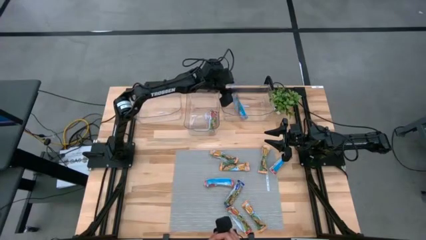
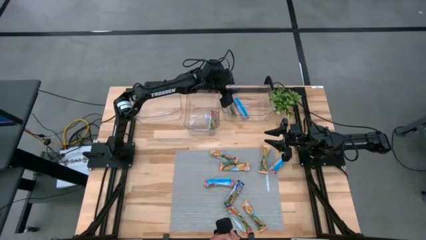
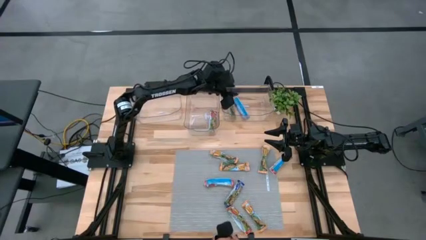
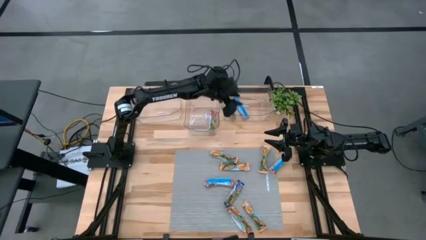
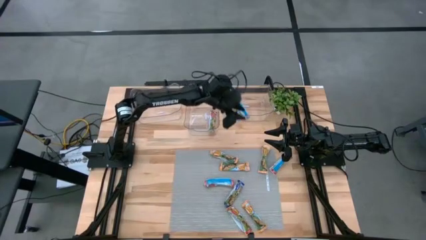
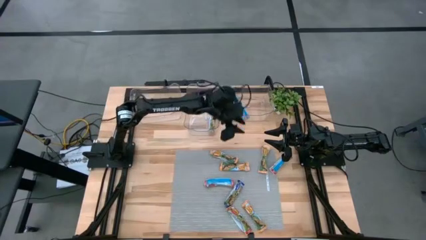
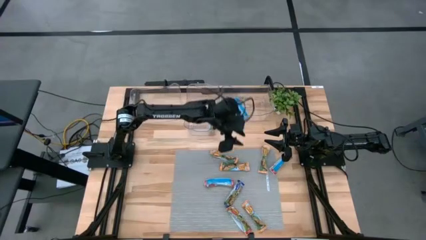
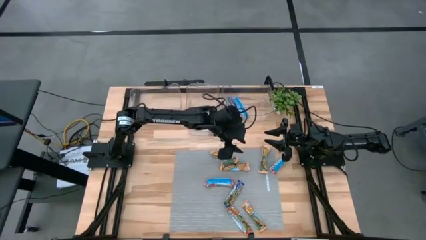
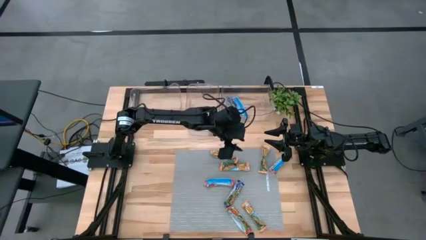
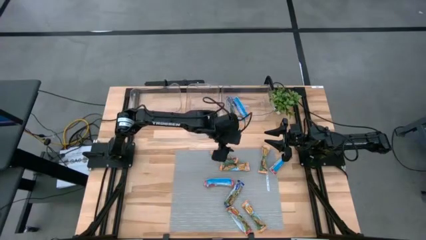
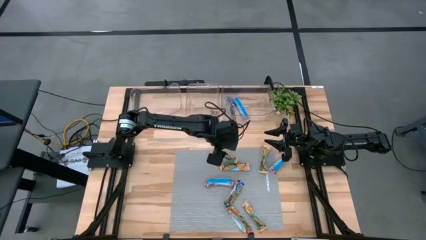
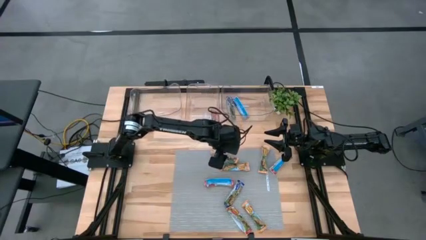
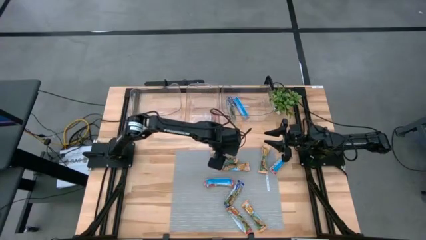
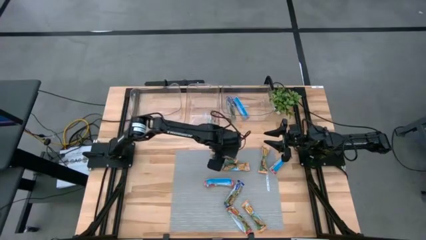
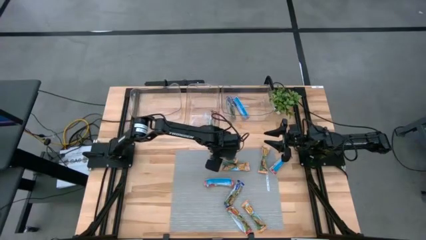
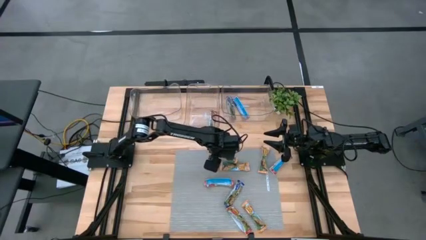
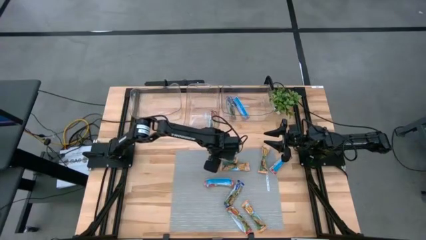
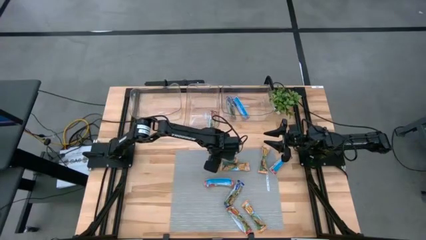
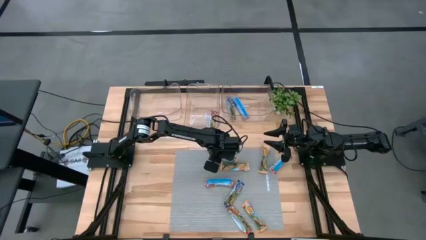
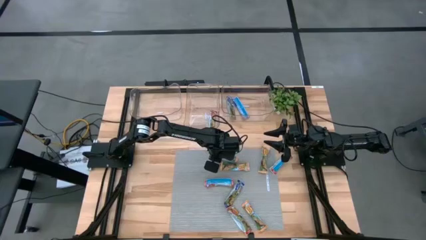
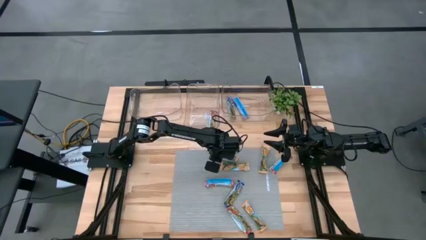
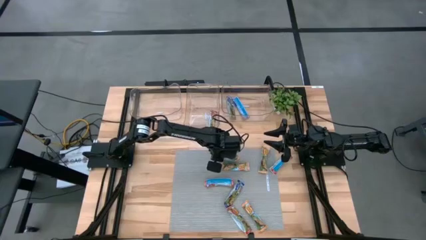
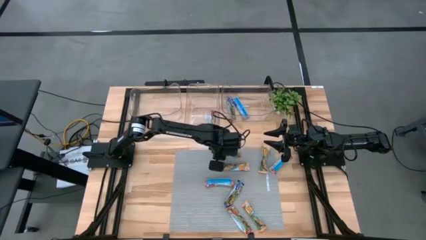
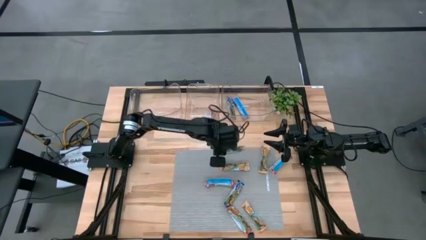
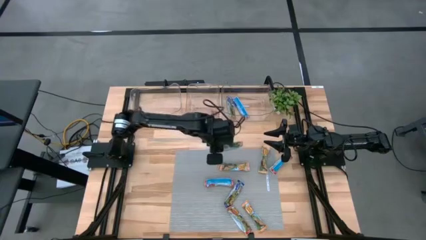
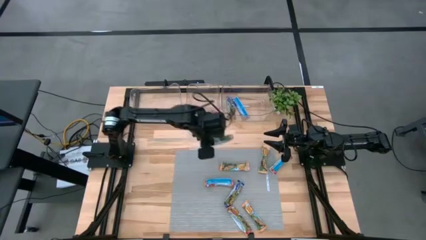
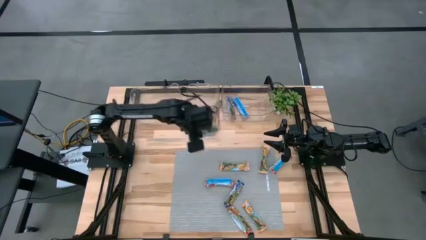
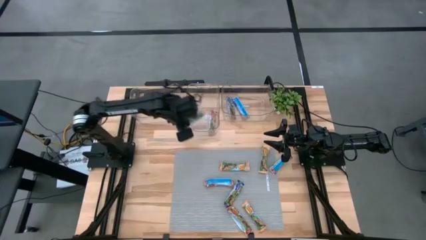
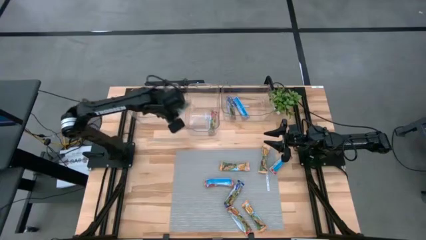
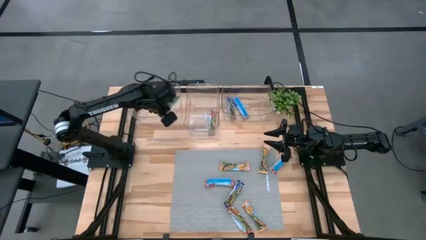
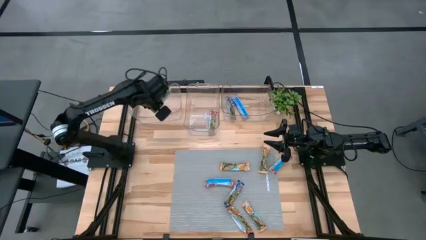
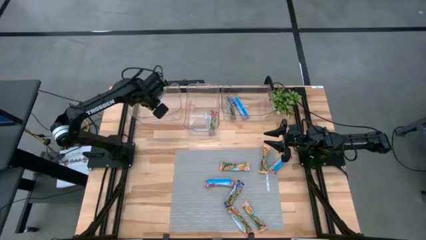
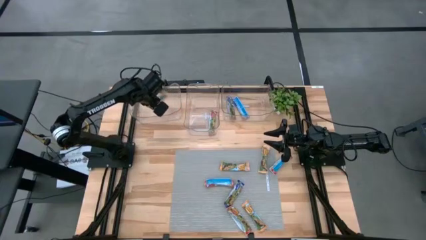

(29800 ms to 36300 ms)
Task: Pick and place Granola Bars by type
Put the yellow granola bar into the left transparent bin

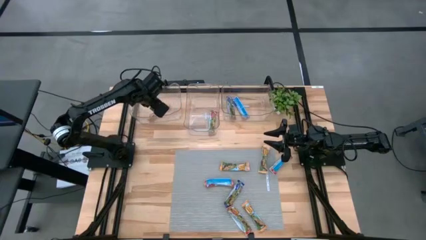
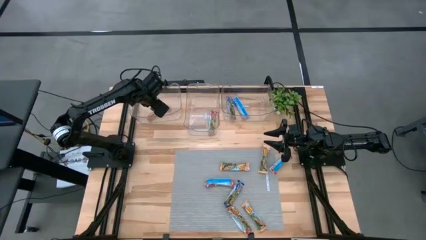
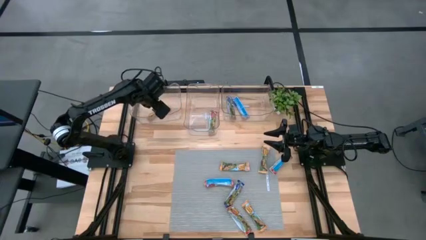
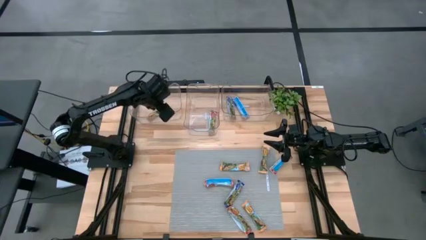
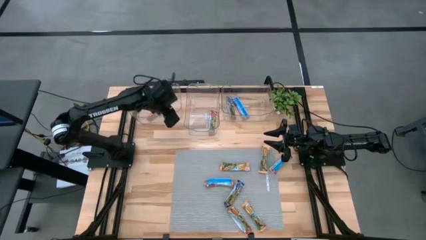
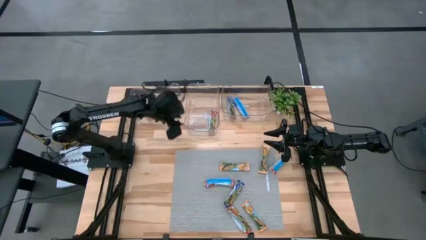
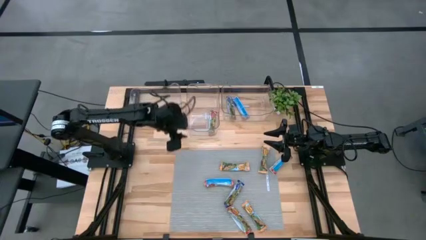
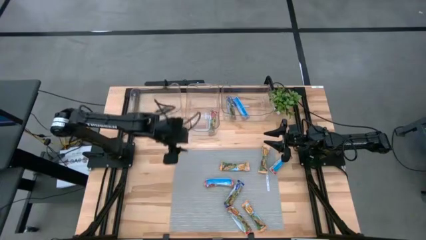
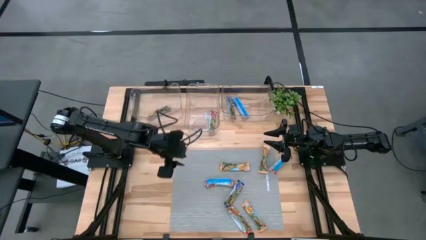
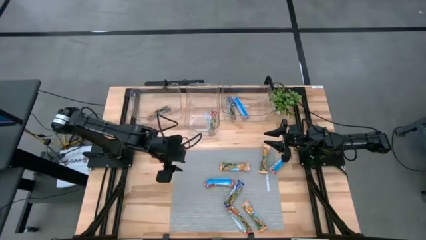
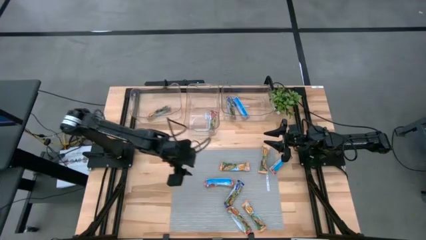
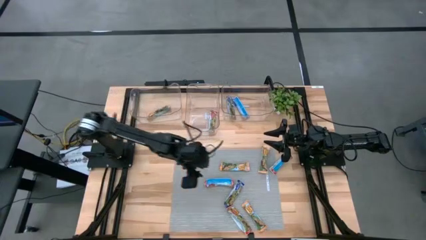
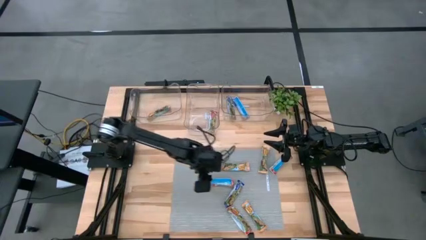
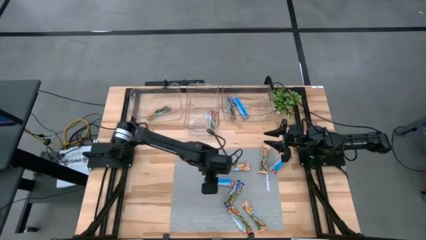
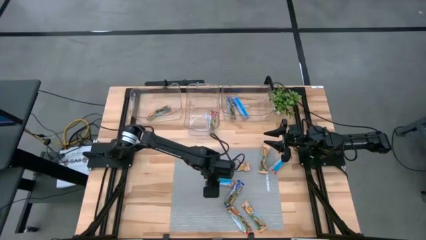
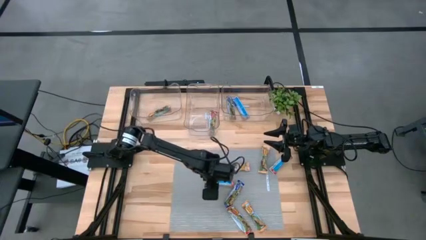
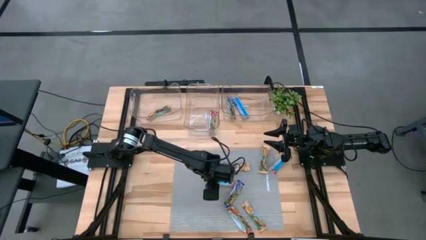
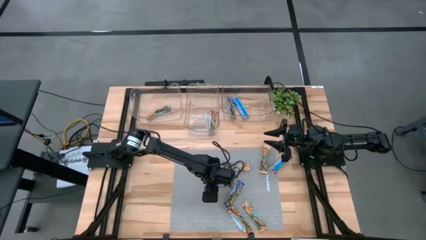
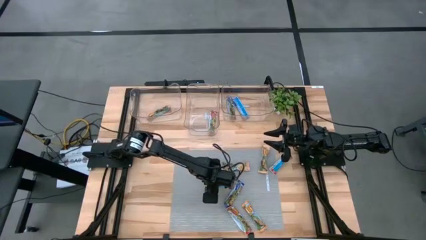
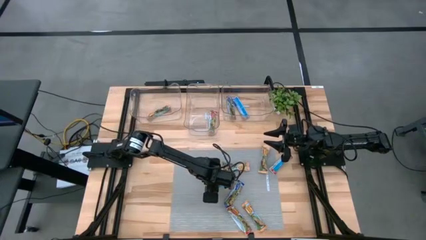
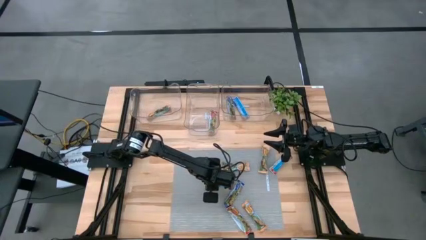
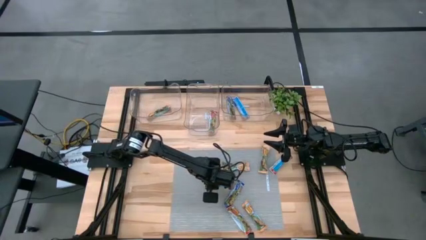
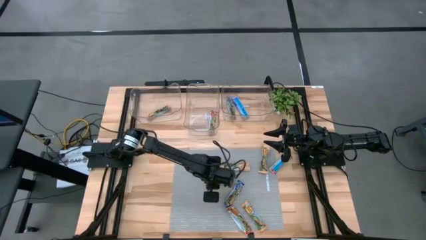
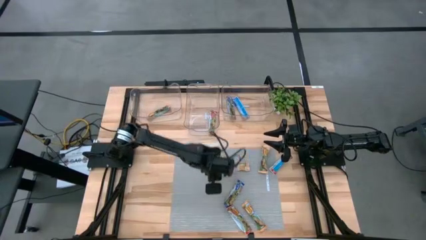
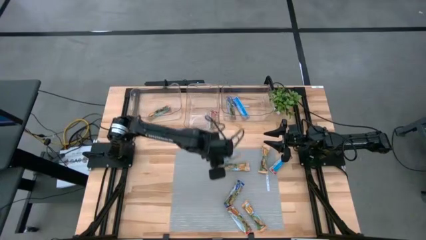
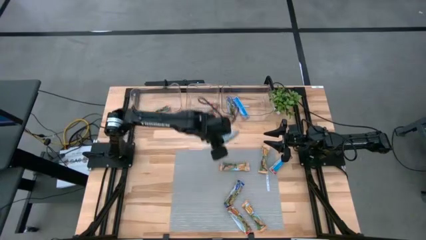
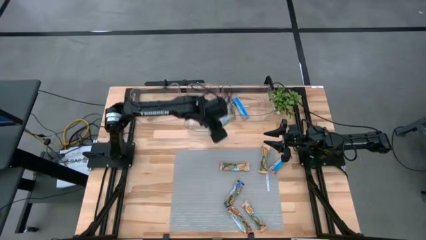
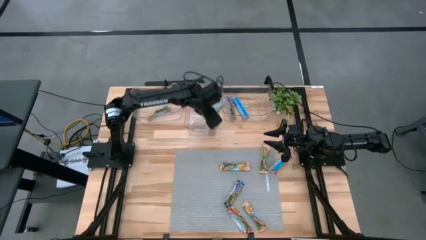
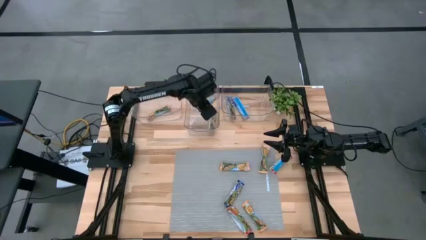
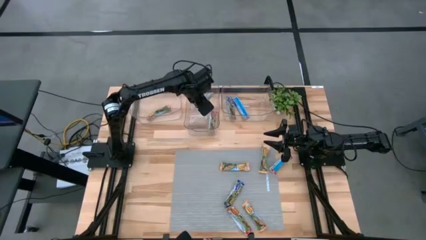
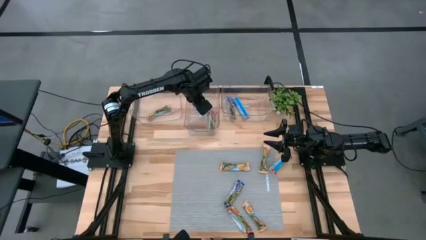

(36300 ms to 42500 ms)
Put the red granola bar into the middle transparent bin
